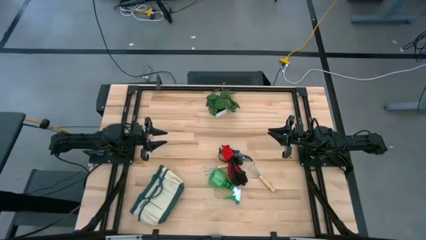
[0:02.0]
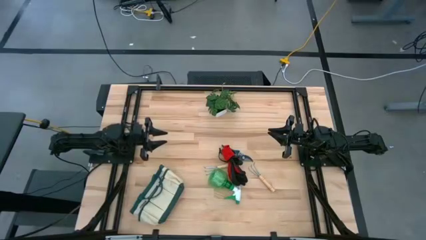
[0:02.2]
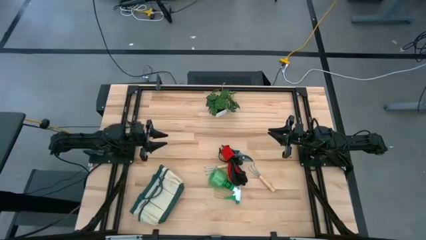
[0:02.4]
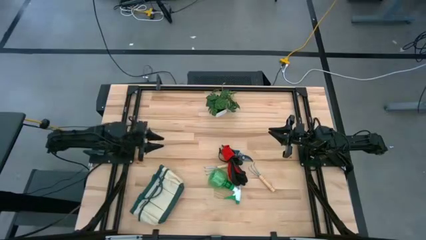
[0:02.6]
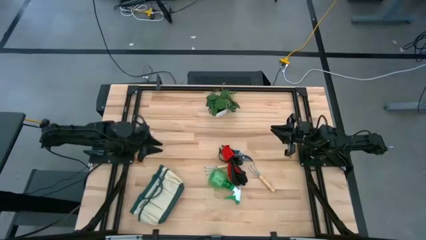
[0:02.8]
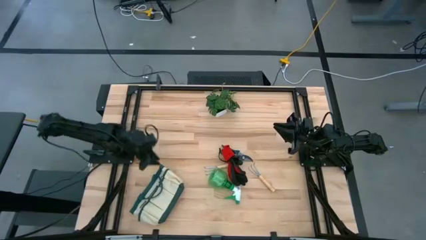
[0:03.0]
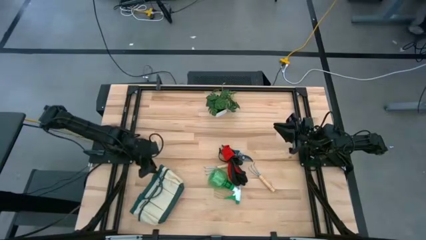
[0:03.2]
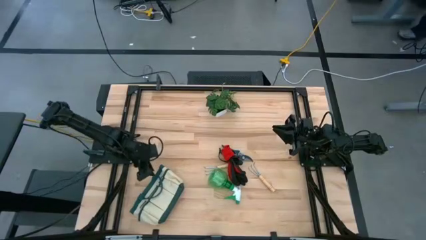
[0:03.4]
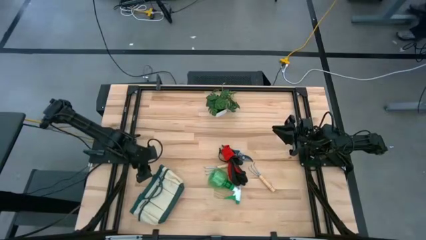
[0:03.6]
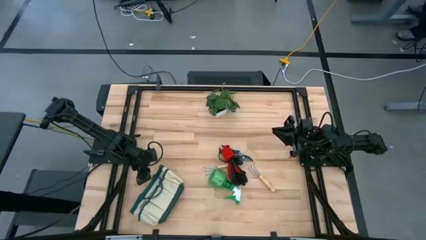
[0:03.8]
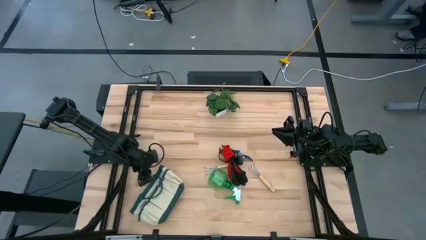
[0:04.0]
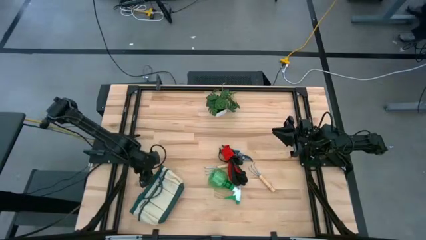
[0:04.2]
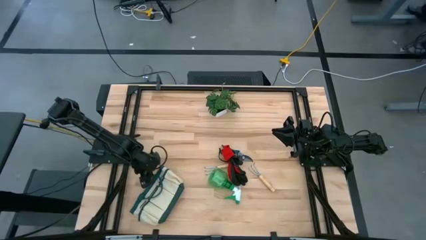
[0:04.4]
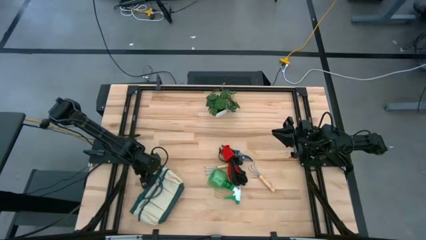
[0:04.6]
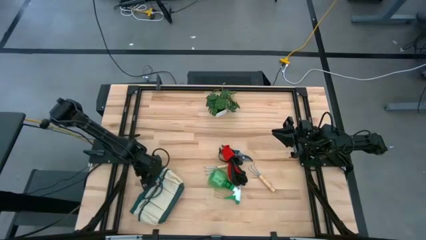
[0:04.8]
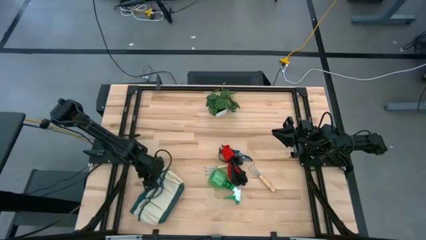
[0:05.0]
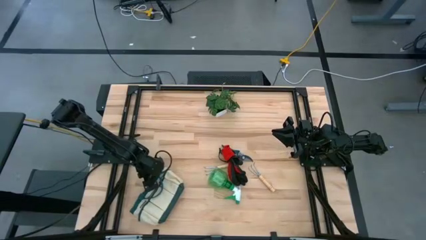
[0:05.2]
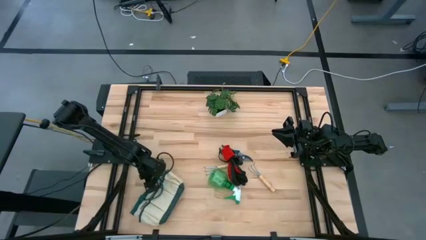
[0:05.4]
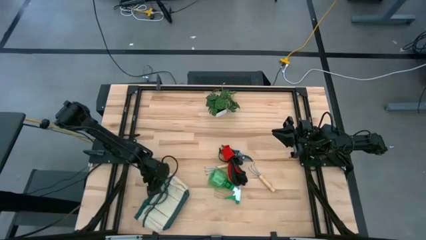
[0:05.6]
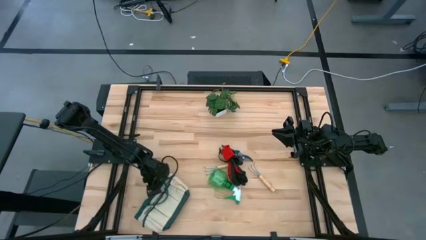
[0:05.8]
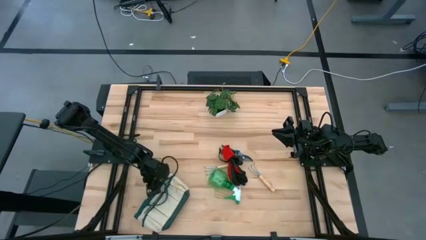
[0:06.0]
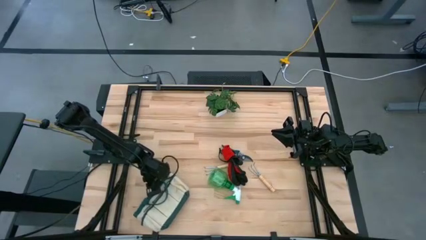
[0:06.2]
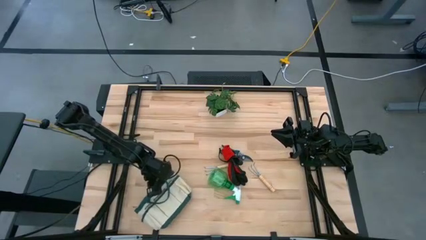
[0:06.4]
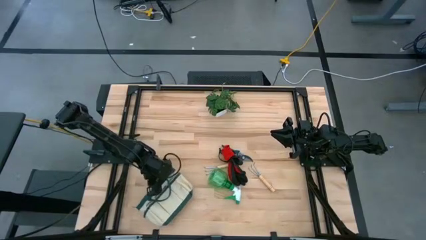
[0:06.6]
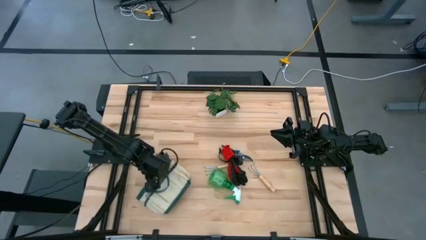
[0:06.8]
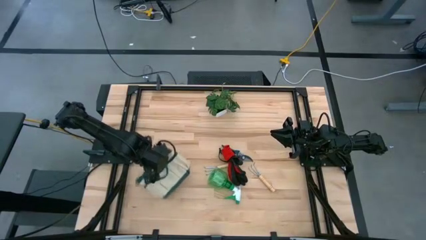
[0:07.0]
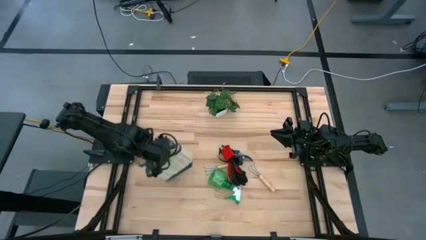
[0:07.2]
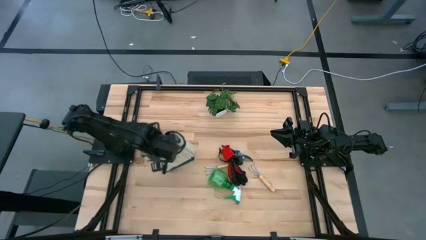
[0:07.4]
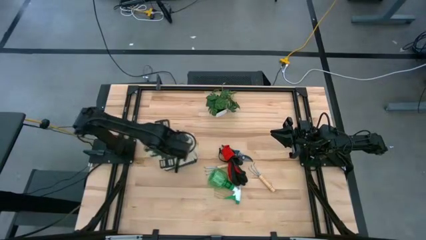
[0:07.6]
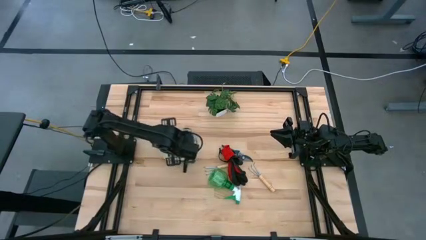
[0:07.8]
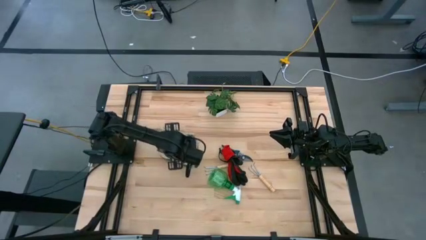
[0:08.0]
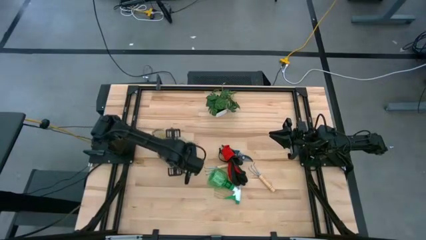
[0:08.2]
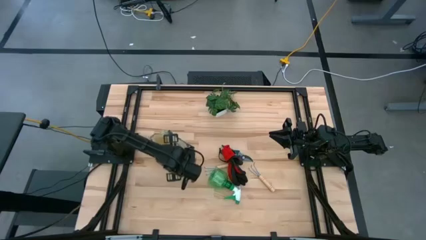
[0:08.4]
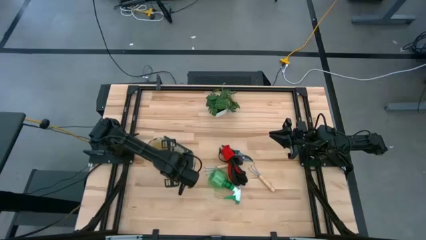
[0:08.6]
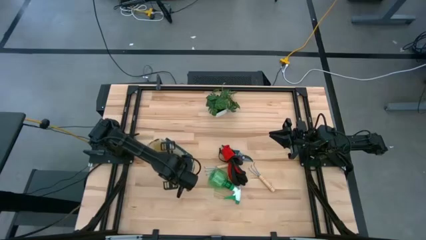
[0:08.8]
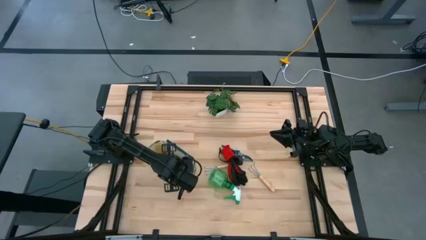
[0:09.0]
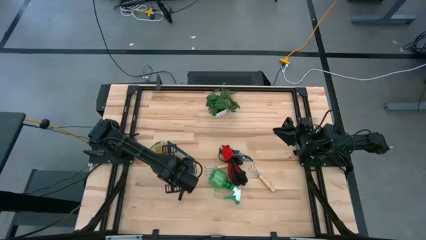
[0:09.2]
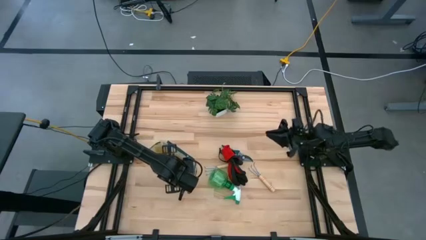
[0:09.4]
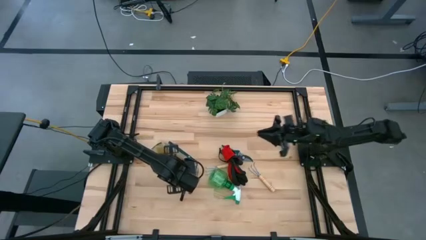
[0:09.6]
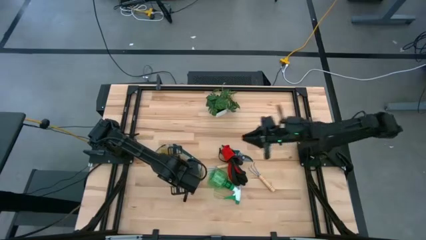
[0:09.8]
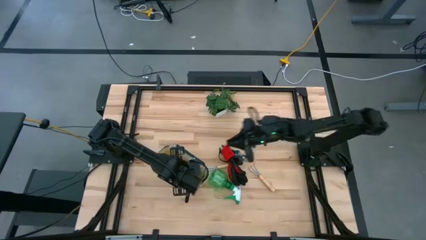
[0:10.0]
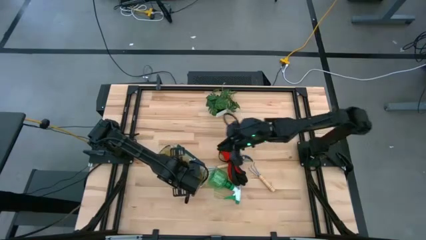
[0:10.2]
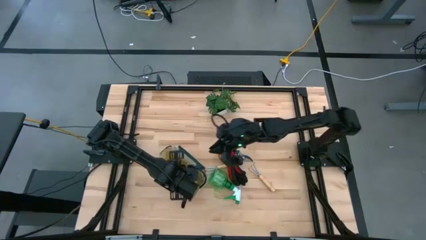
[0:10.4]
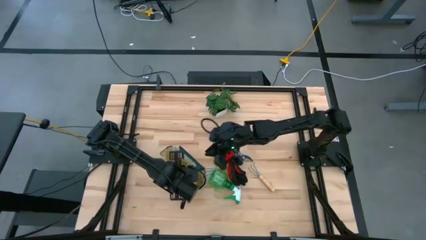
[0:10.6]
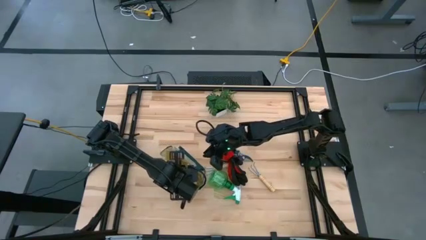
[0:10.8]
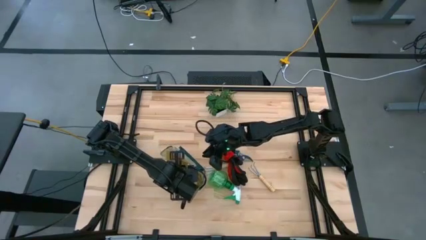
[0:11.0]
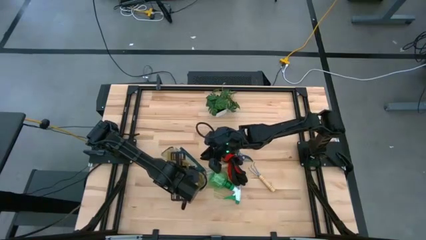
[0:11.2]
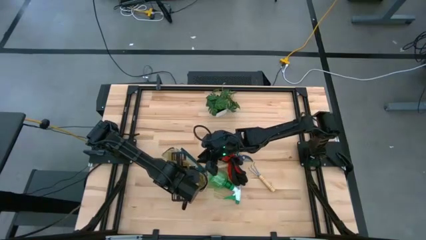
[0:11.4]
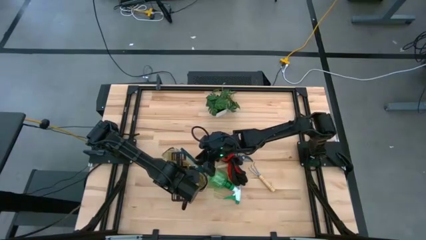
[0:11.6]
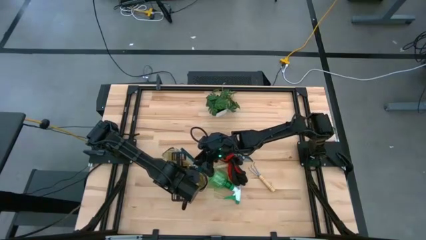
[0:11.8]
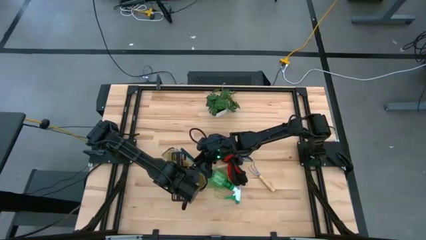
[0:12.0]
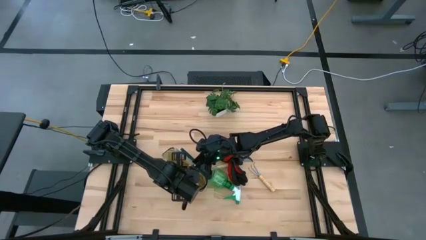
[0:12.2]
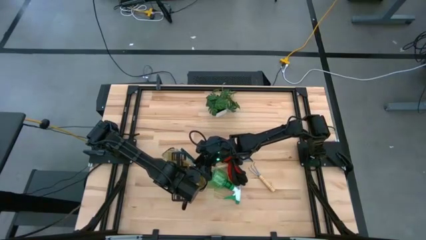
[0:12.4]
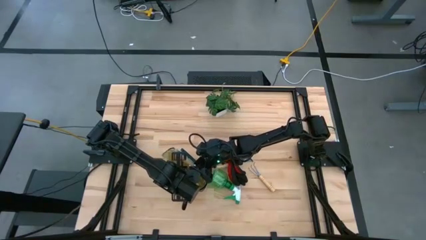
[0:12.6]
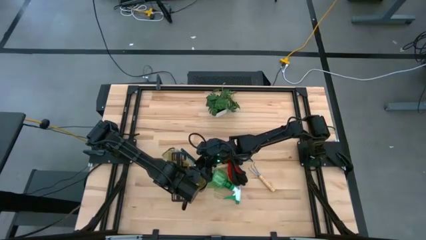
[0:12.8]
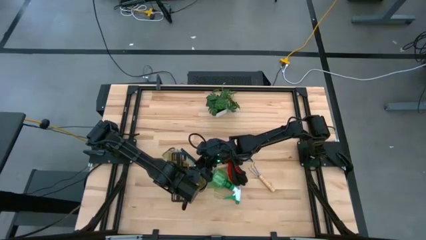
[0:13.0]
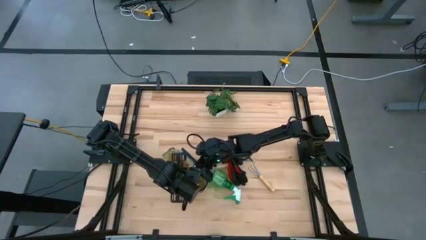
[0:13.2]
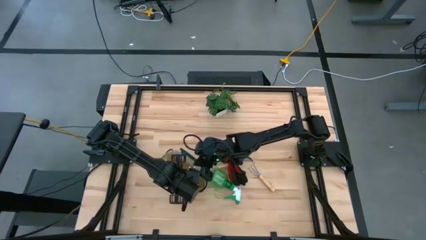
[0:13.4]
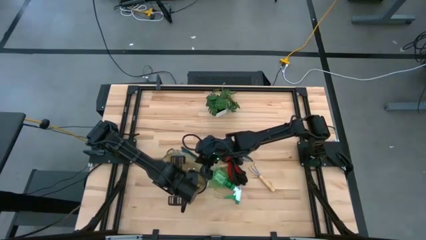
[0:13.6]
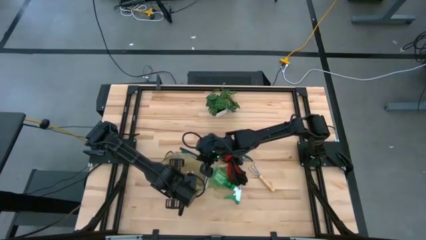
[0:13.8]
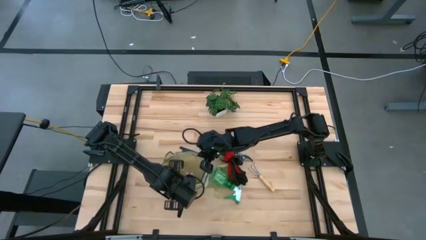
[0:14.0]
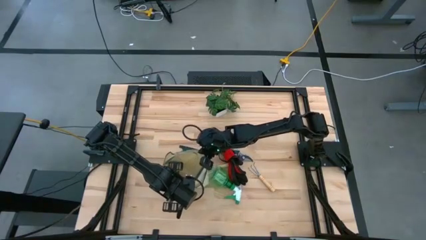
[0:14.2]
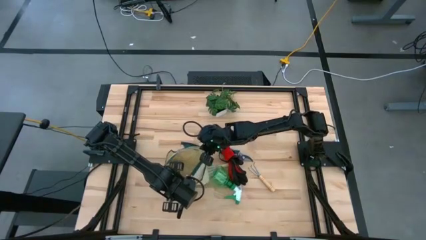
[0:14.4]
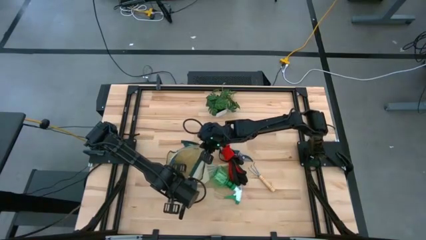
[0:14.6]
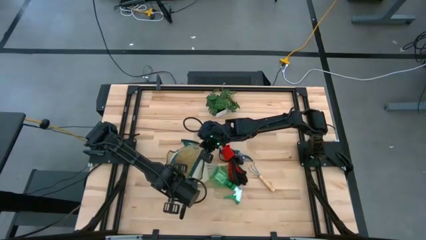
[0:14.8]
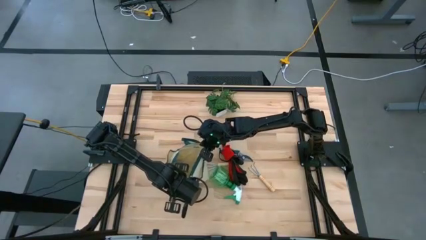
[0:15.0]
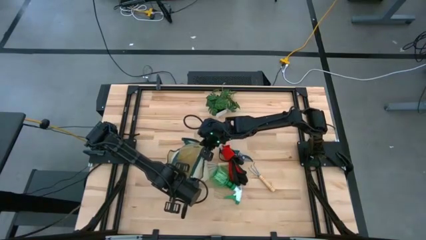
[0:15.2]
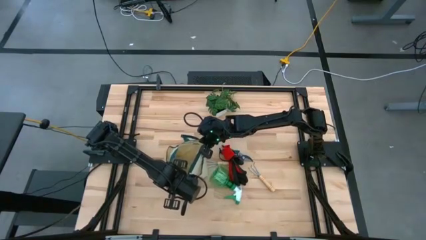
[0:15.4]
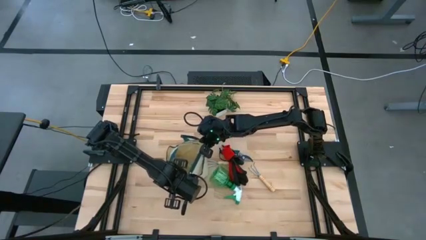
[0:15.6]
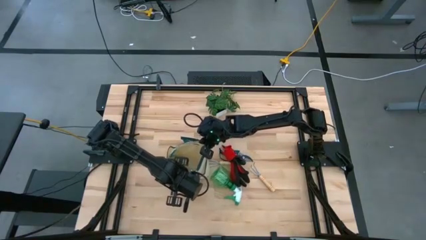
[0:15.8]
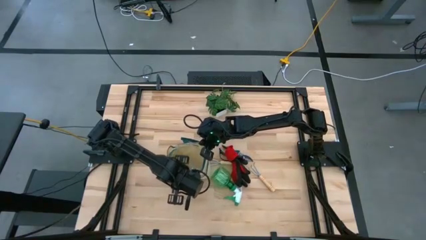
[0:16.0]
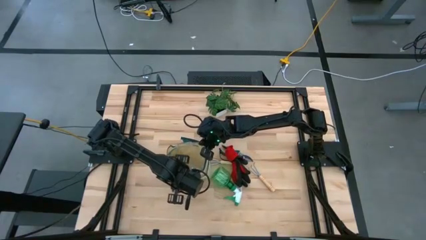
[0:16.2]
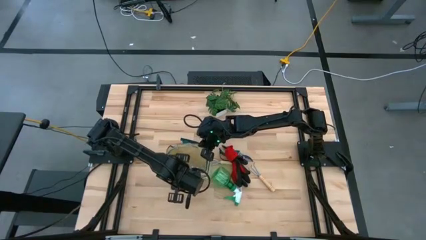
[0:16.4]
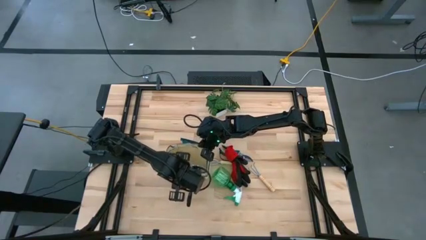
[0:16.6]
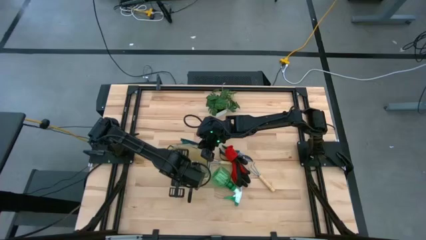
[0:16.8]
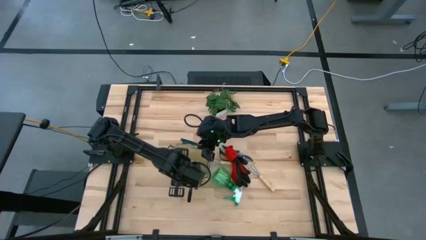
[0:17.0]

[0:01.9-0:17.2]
Task: Pick & Place Garden tools in Gardening bag
Prepare the green gardening bag
